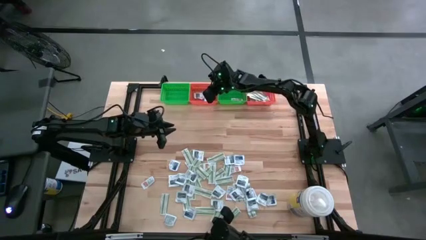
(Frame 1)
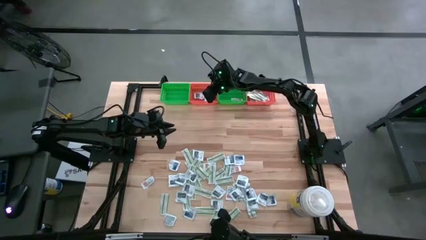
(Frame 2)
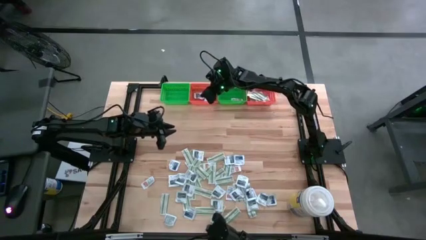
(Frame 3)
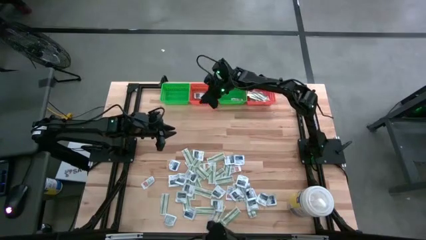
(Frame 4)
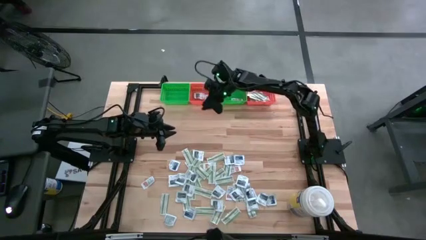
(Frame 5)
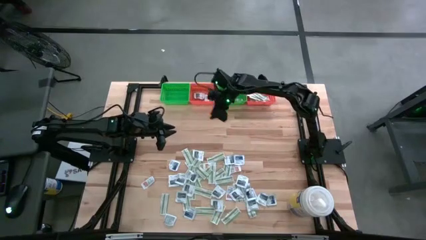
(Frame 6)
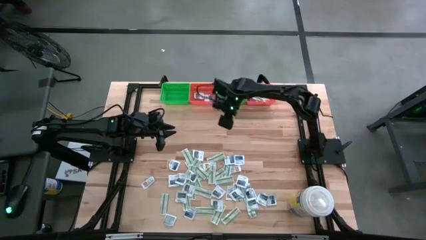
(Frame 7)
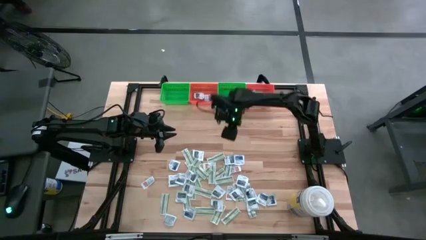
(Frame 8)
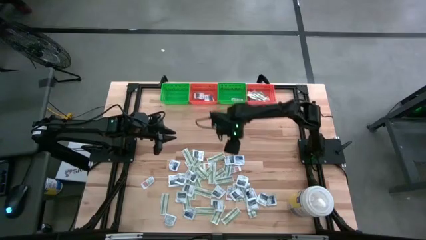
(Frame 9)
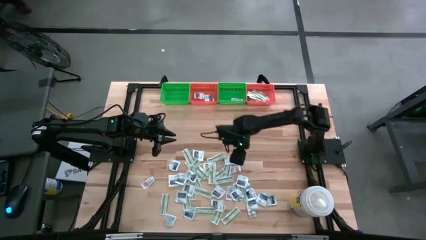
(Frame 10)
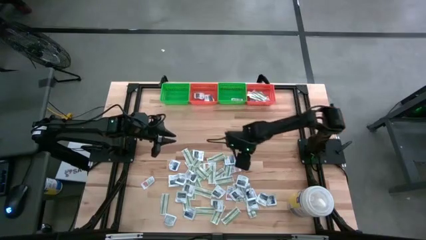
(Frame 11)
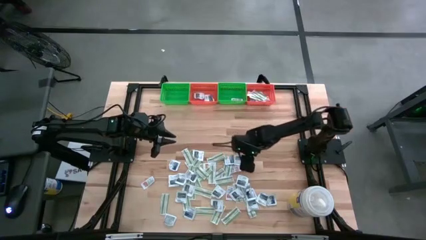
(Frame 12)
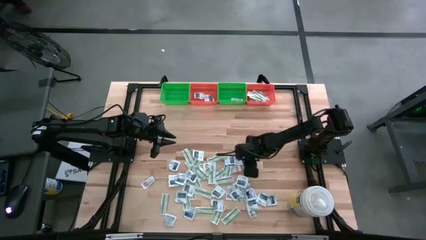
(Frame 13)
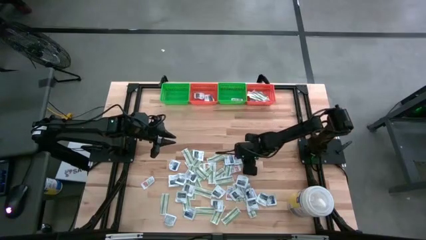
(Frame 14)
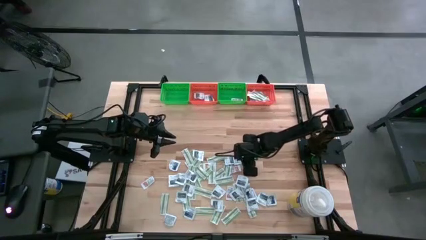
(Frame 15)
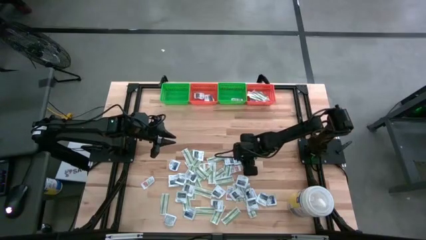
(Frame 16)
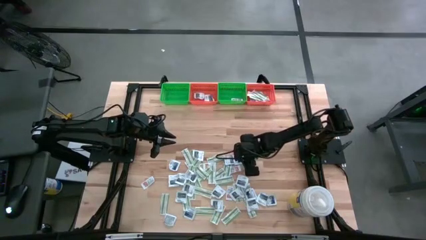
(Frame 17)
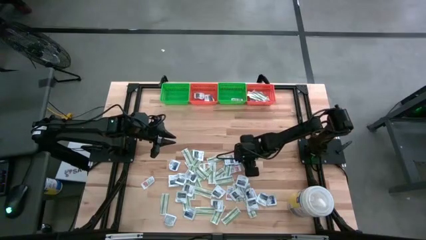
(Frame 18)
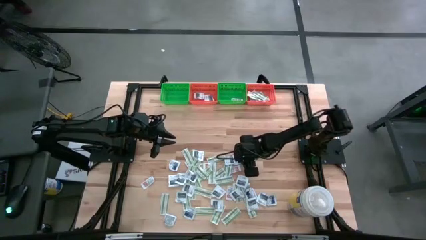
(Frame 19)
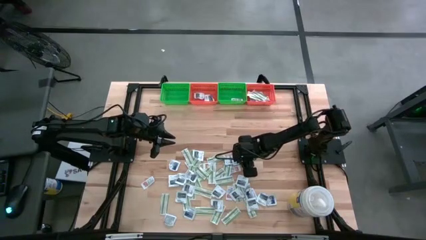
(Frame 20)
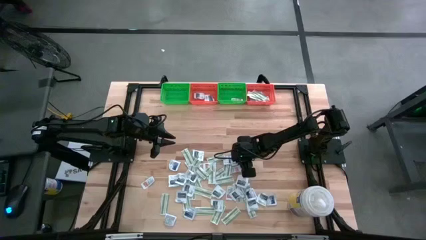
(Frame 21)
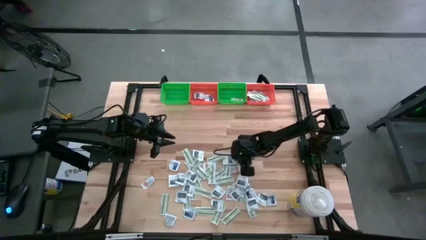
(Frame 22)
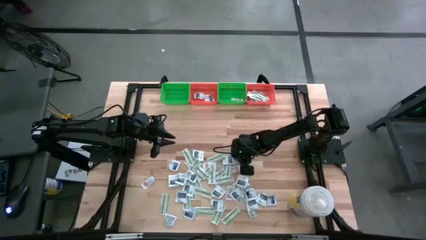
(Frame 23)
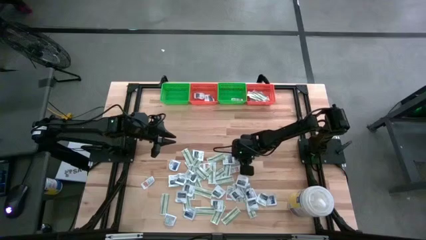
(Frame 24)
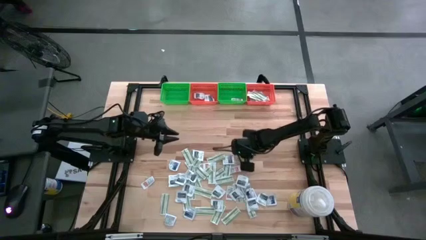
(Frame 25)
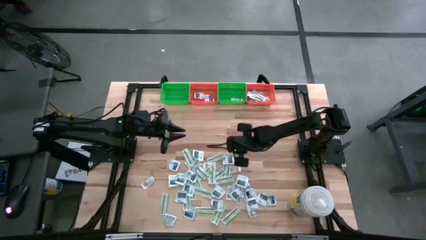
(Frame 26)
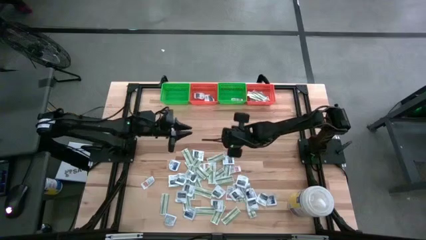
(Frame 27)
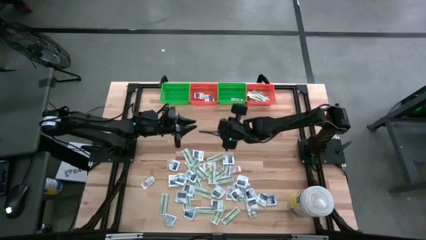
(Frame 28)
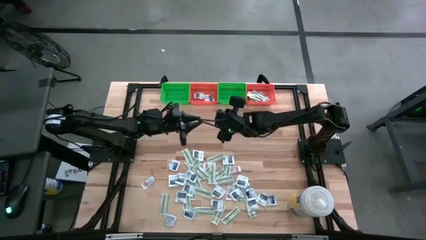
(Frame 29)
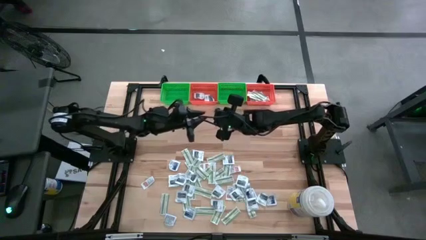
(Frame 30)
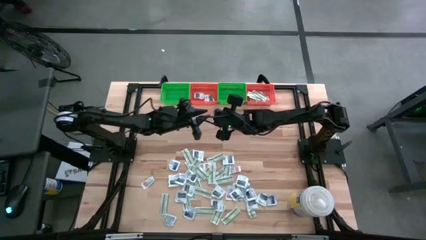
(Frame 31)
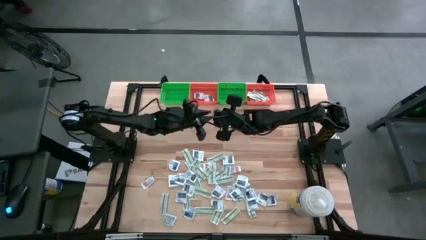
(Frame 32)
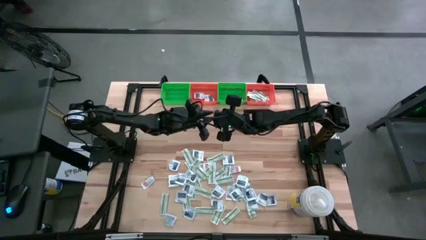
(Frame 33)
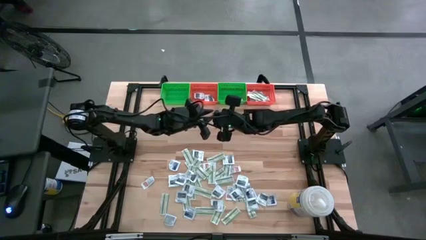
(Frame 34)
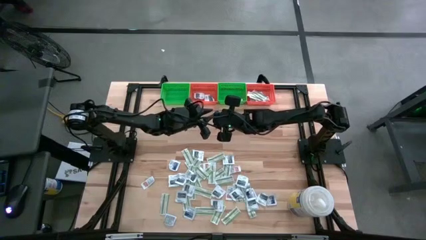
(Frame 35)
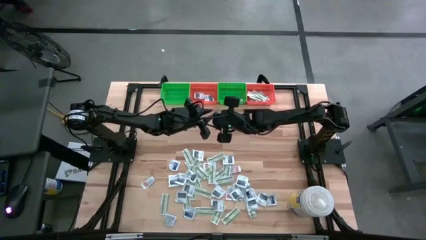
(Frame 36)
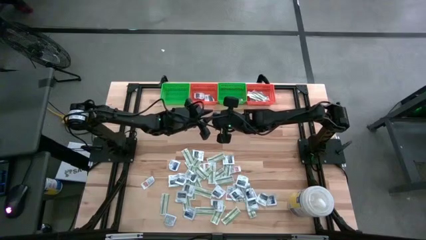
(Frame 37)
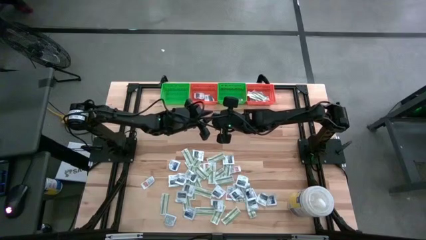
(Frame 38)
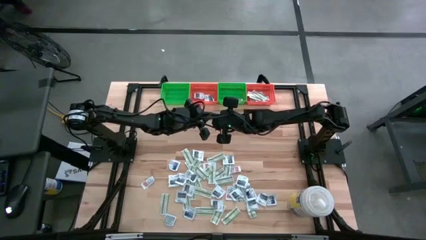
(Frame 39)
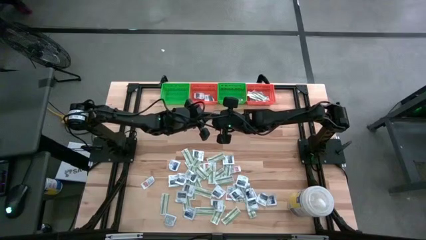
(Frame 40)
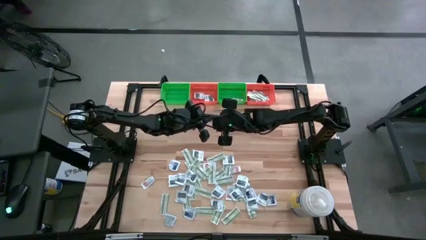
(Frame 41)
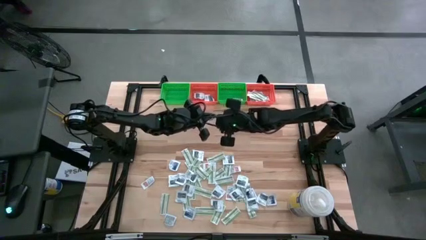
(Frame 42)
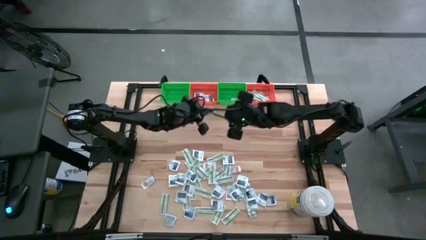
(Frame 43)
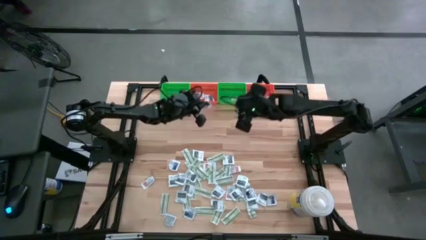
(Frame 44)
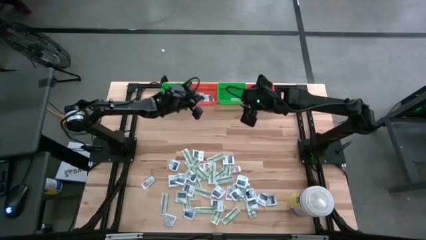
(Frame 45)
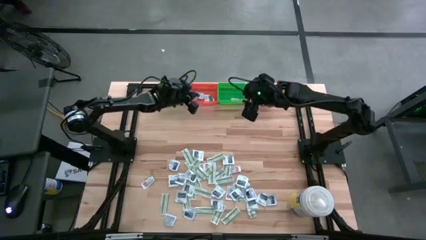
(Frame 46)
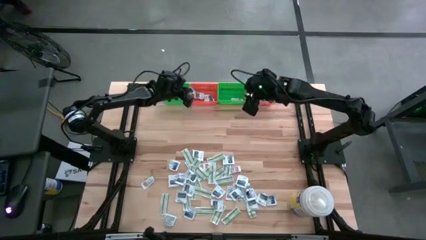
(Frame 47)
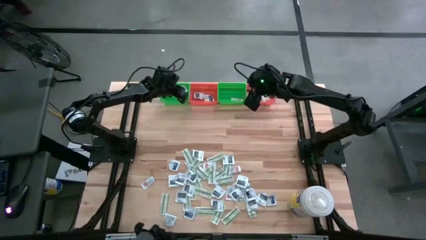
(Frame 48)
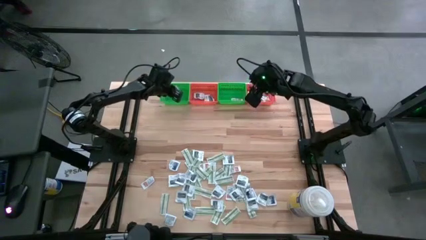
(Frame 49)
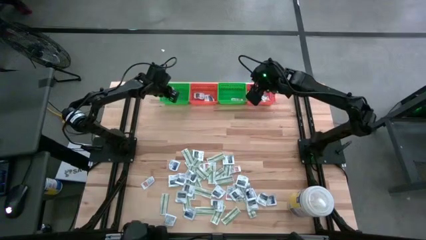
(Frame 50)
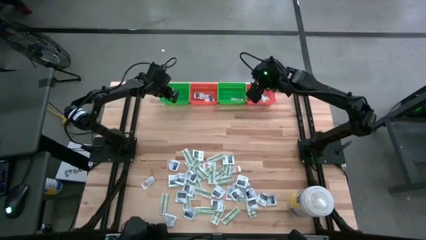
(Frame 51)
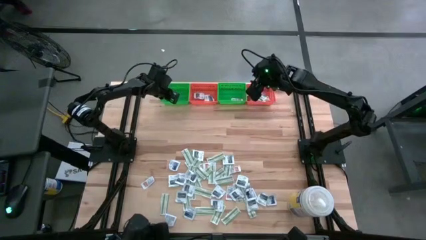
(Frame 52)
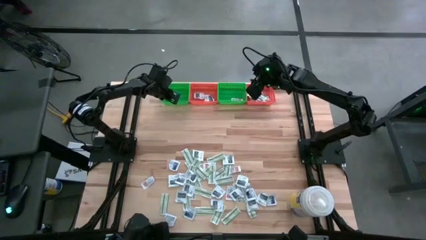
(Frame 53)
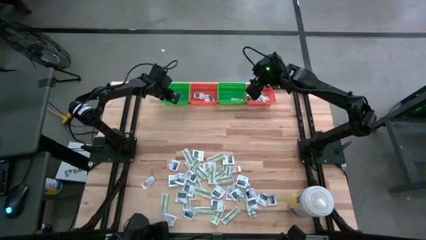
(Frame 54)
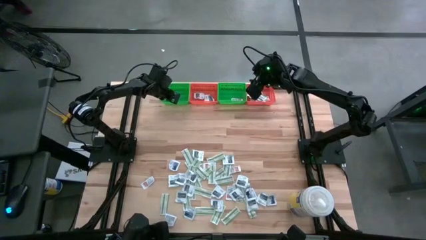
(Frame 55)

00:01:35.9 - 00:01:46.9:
Task: Pick & Place First Aid Supplies
Put the blue alcohol pad in the left green bin

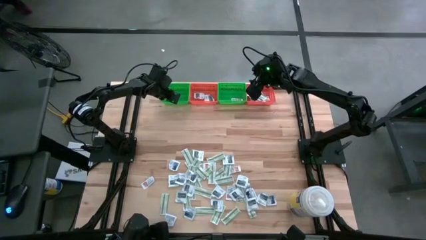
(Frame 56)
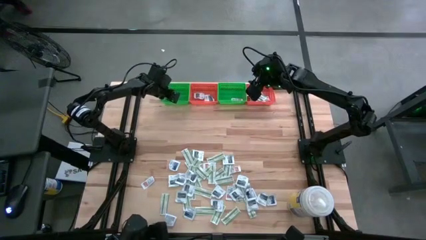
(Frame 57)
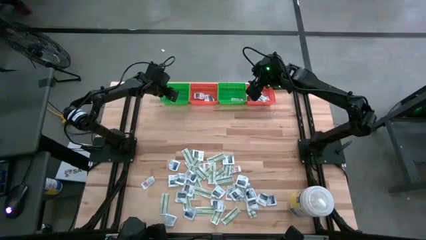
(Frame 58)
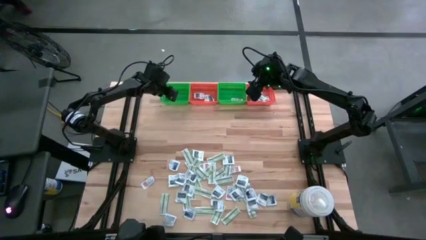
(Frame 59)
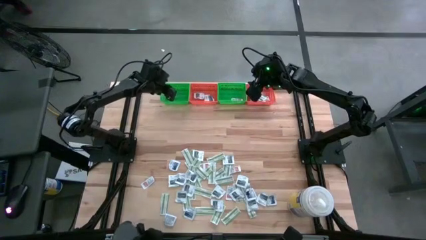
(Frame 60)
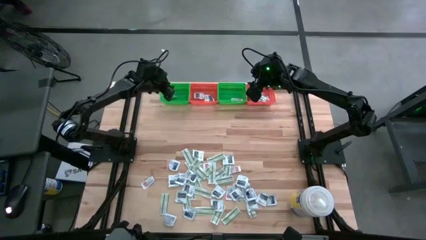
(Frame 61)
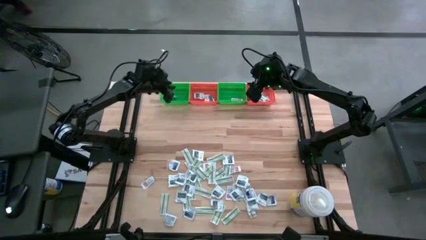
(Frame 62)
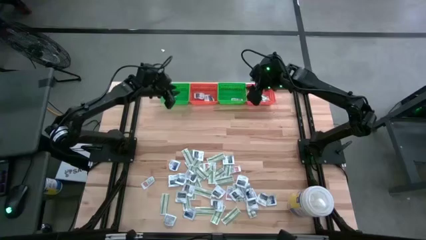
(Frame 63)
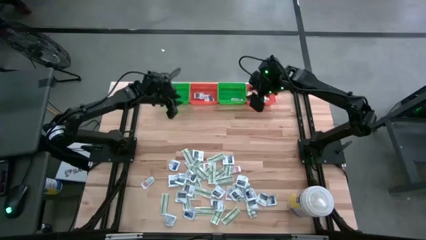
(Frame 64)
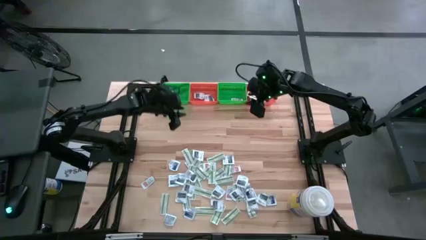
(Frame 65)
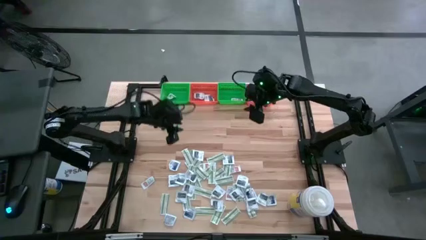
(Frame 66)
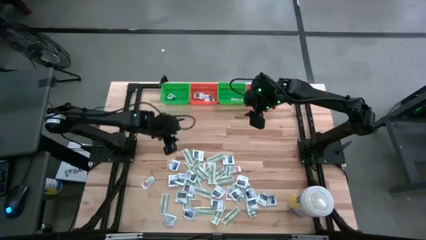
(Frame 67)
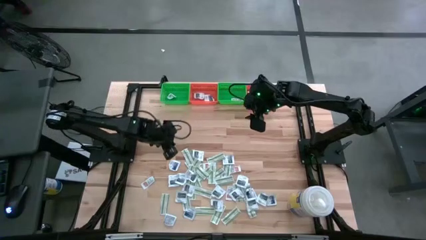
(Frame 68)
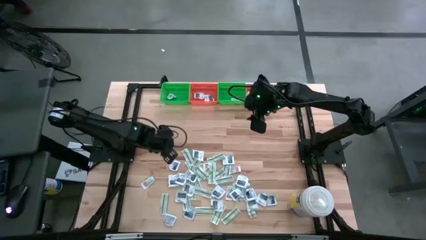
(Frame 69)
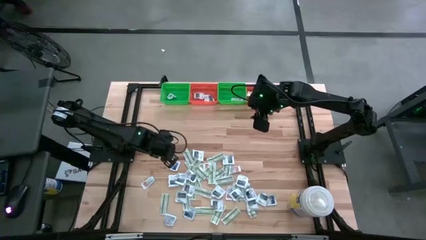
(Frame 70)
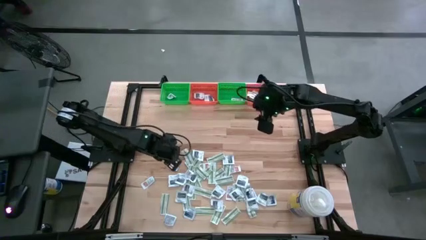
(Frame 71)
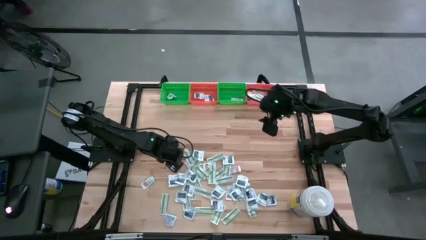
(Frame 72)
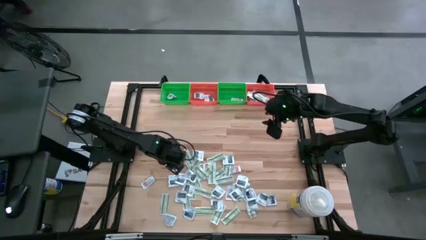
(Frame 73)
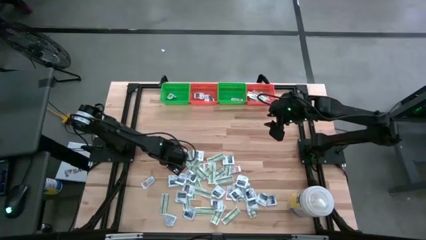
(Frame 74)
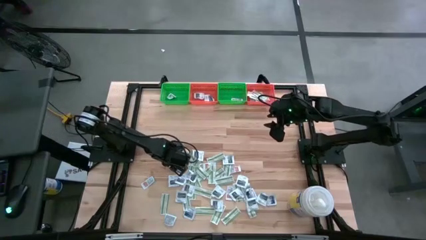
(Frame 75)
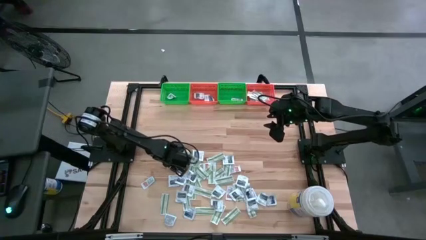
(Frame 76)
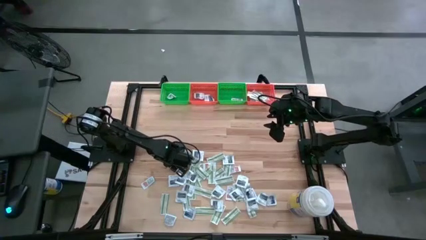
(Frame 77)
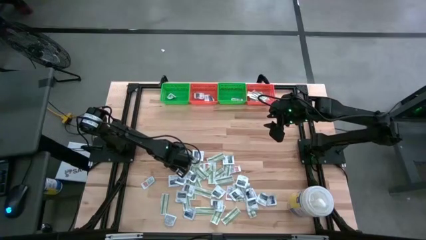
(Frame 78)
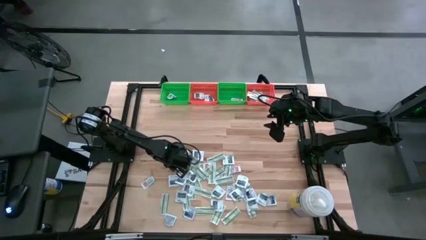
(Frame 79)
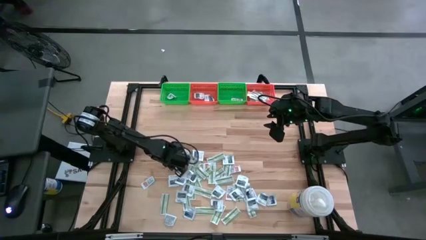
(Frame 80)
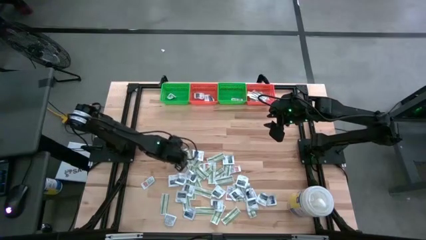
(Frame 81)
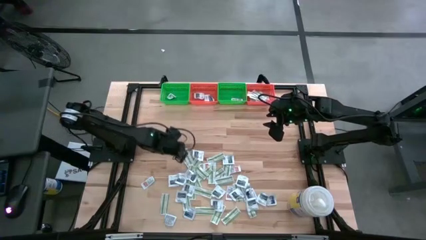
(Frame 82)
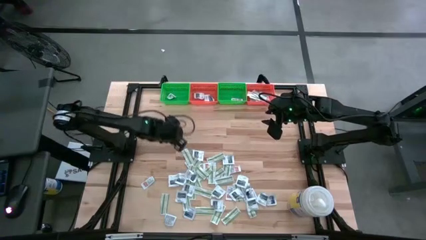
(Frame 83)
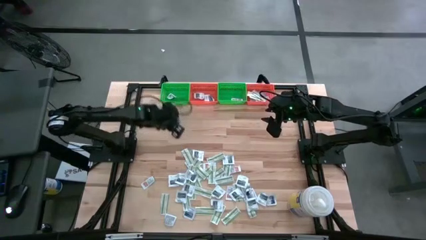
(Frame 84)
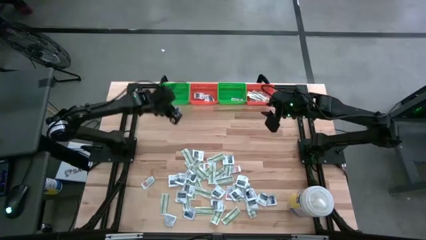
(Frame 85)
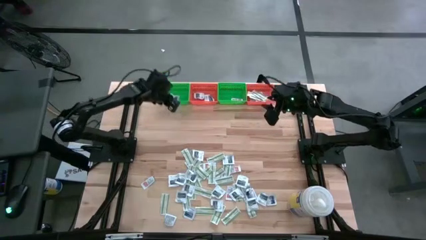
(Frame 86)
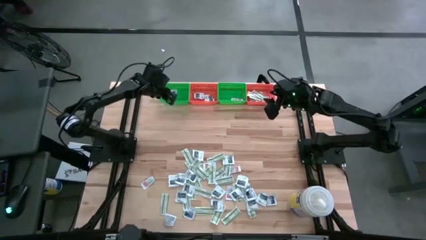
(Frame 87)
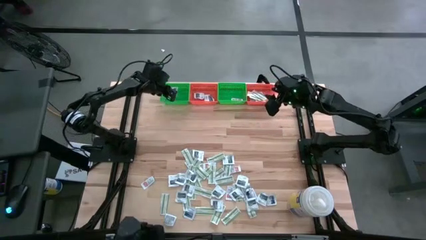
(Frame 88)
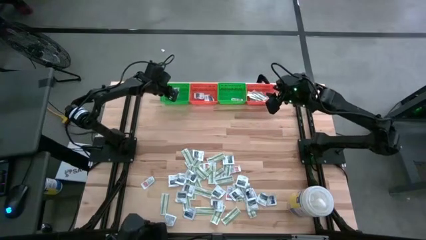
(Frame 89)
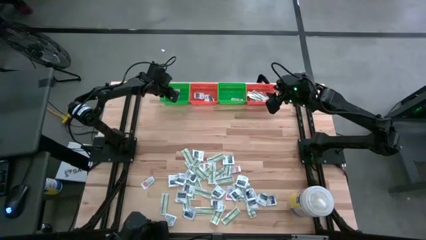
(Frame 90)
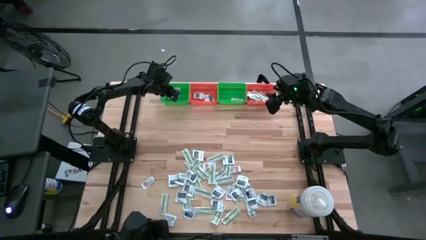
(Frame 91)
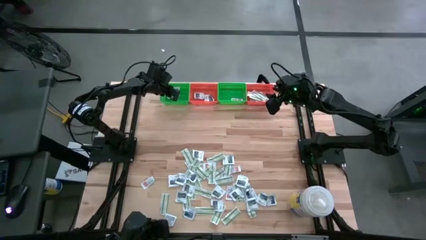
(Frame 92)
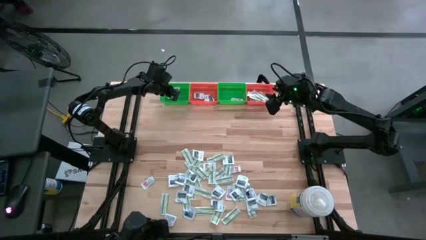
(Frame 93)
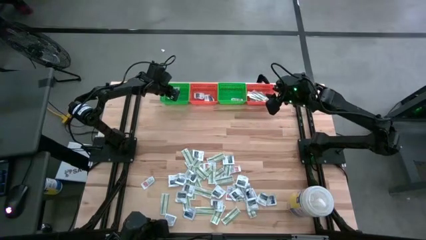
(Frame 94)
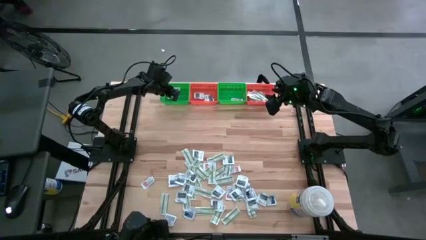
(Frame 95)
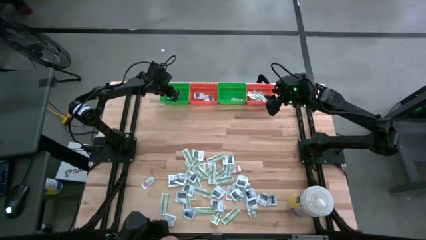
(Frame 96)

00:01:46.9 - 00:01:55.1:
Put the blue alcohol pad in the left green bin
